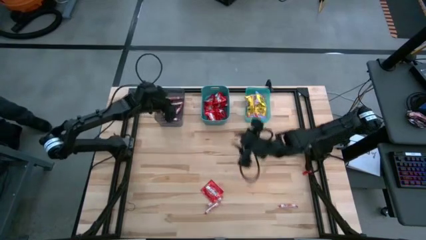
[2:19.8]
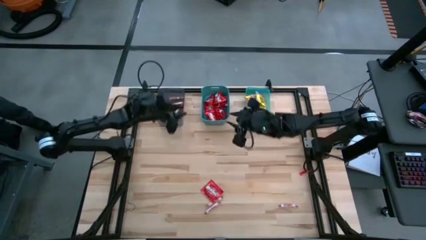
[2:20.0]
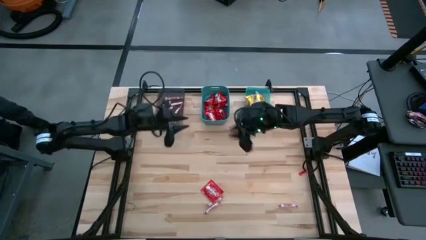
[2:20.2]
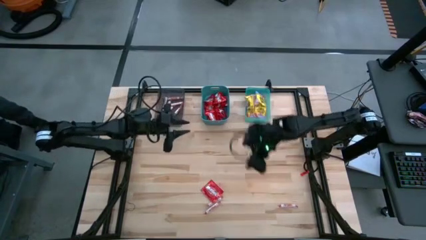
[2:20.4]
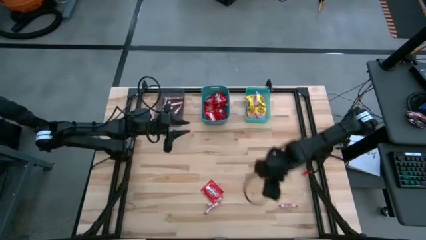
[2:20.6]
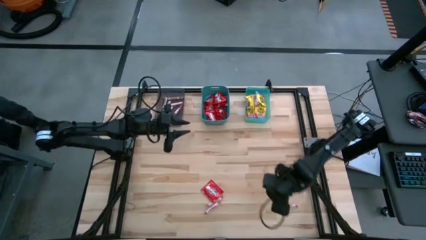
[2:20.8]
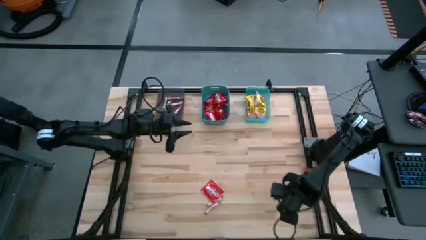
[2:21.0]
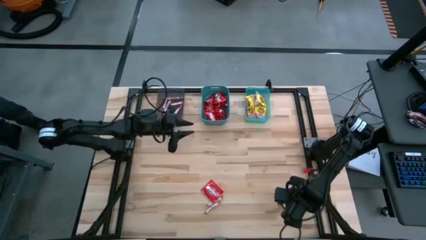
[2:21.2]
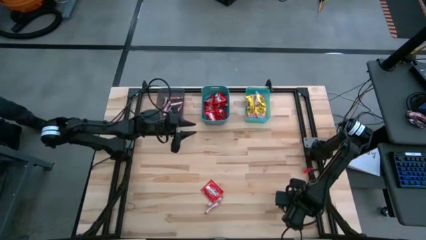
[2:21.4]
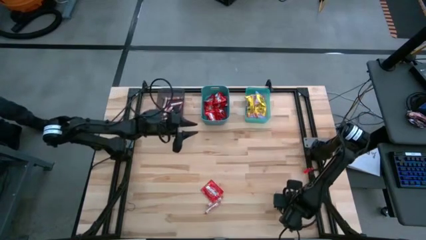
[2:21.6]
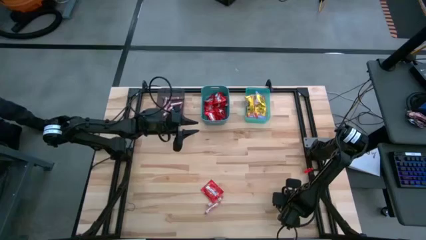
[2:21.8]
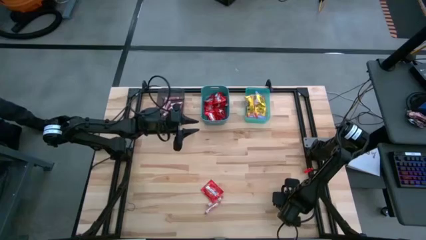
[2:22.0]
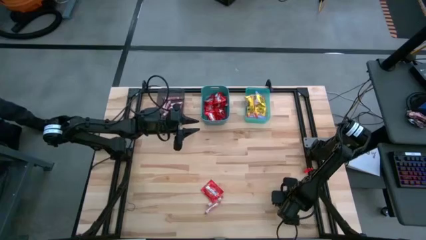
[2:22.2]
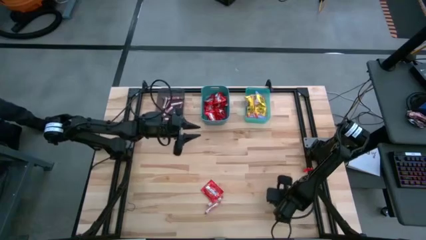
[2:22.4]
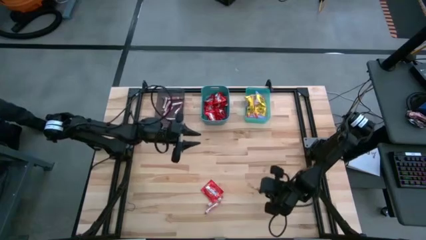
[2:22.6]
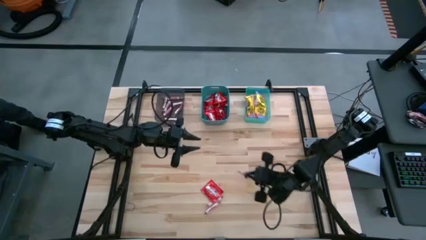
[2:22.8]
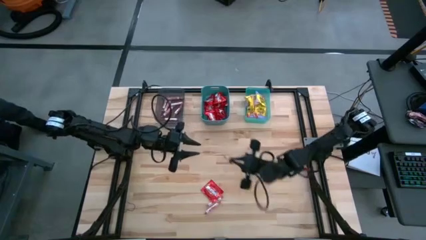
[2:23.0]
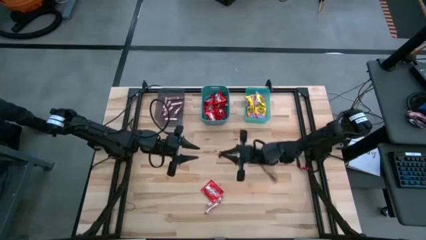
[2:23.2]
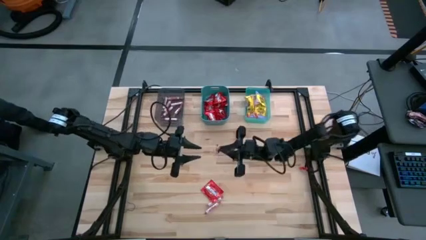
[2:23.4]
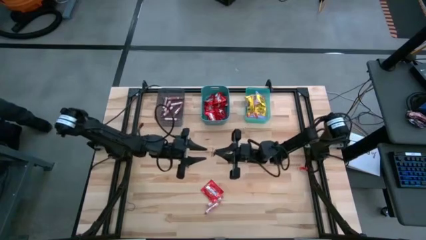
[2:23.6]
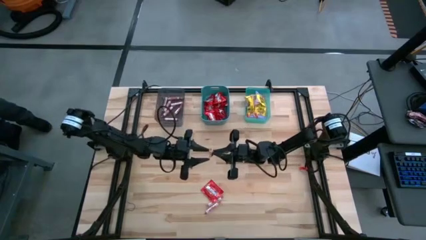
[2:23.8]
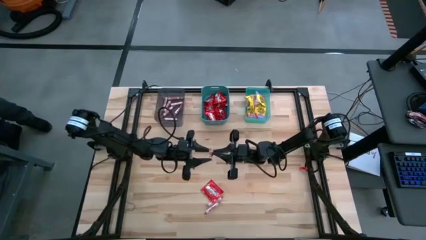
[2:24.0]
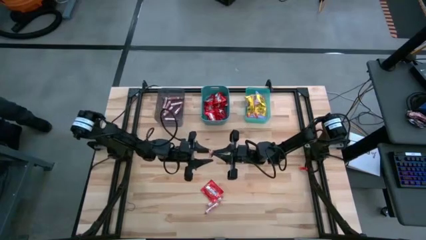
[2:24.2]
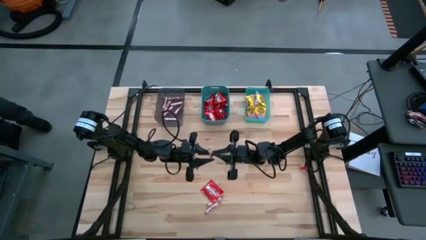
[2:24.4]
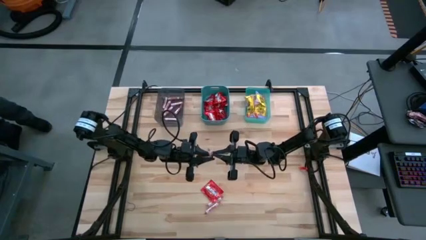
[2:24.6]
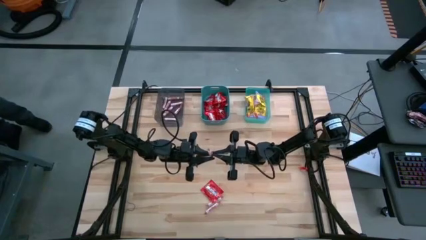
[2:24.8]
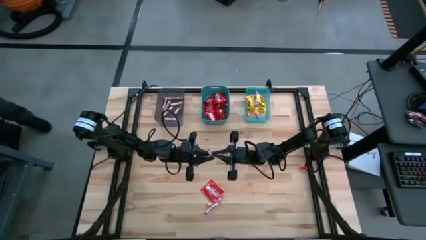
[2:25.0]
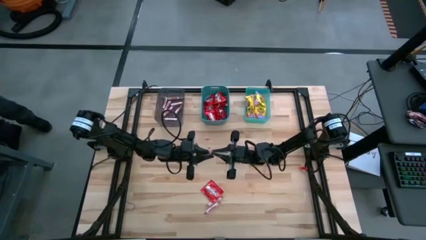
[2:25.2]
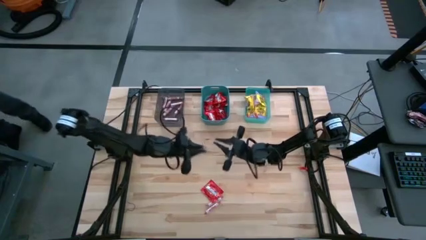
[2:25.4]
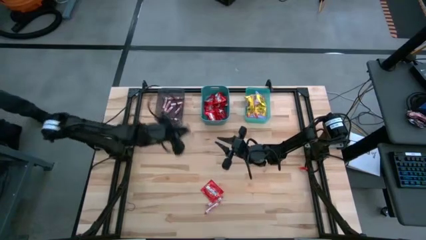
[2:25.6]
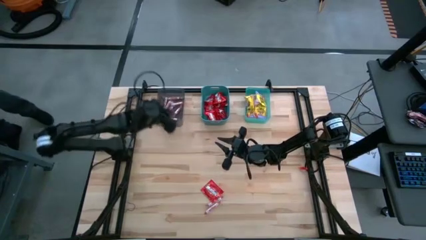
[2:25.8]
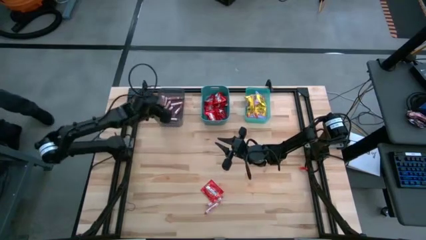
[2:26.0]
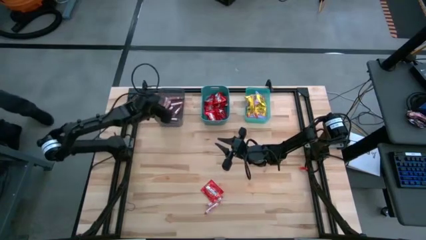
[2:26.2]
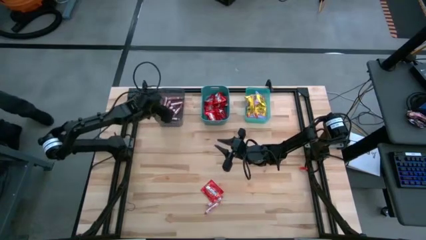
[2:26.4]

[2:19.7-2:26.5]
Task: Sort candy
Put the white candy on the black bin

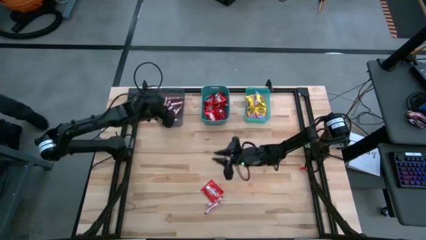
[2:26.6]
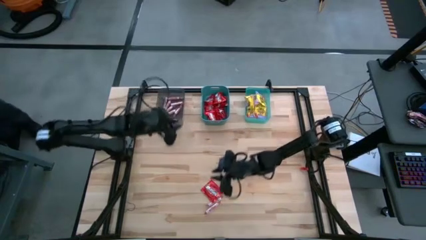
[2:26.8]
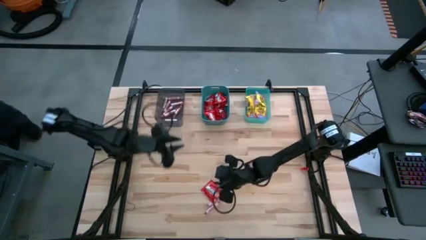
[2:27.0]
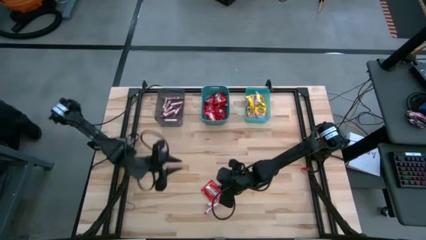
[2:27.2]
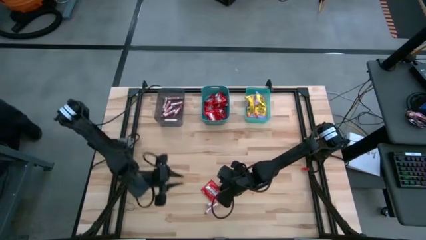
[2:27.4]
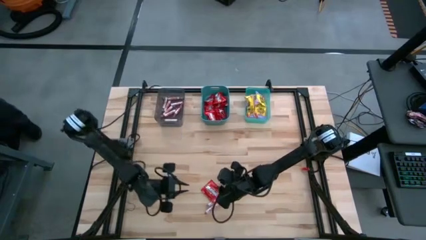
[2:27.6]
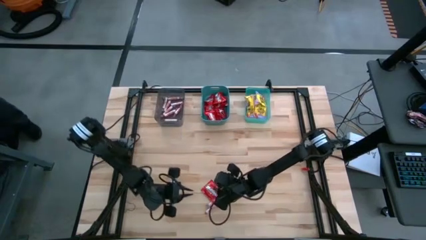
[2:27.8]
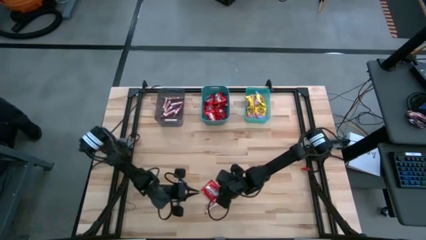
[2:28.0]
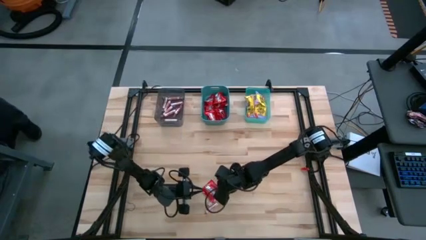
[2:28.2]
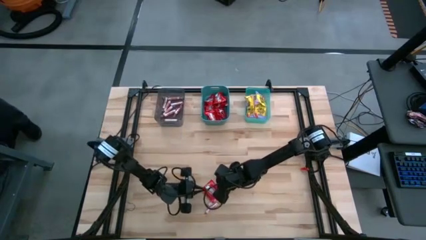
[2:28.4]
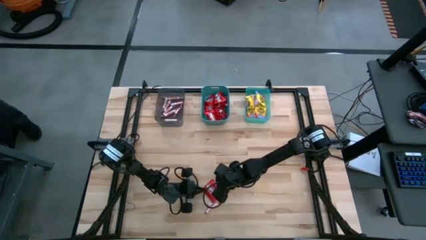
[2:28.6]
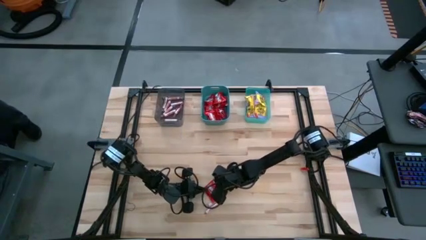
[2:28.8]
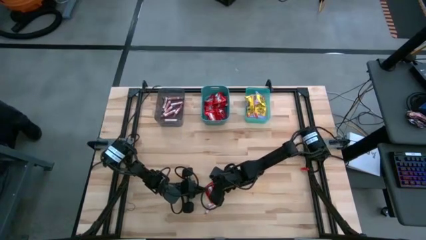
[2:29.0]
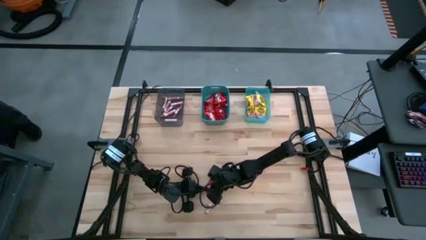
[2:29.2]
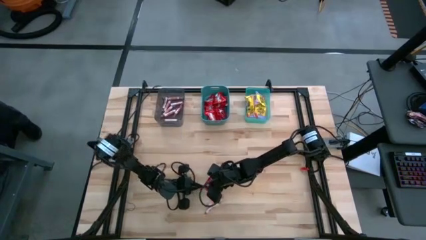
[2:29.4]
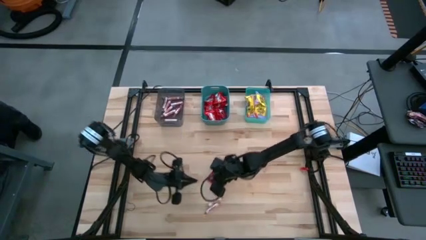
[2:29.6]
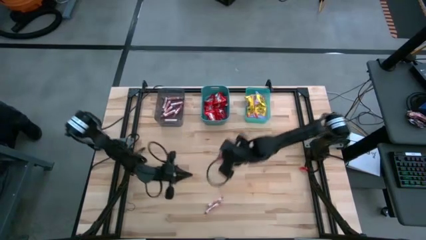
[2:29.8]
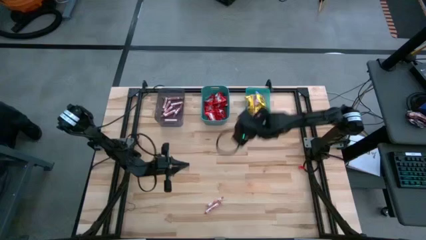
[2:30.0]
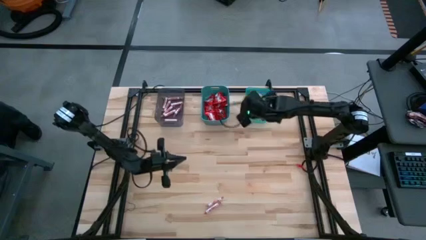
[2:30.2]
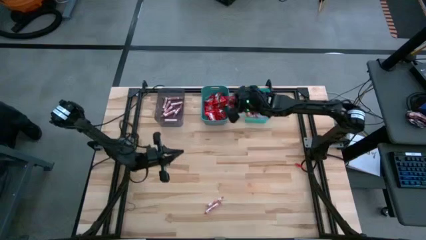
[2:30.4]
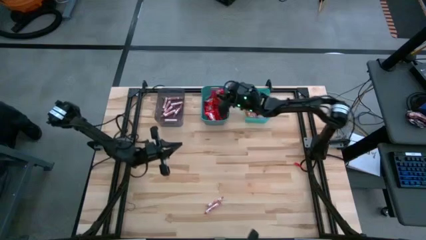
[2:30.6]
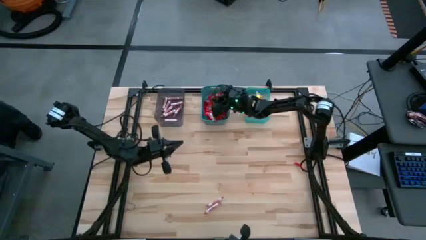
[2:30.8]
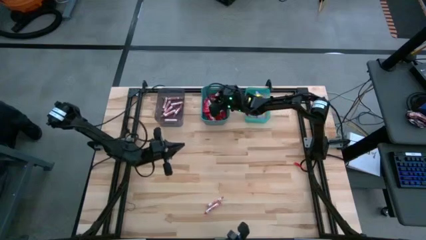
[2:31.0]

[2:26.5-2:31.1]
Put the red candy on the dark green bin

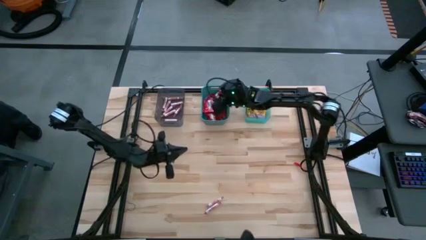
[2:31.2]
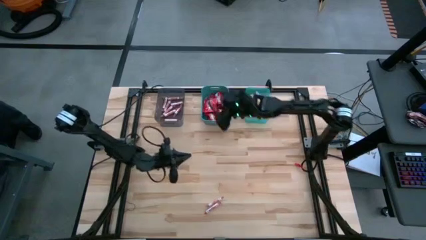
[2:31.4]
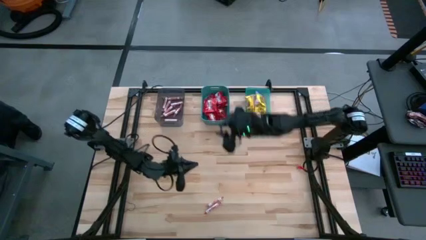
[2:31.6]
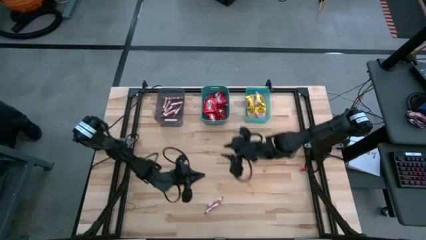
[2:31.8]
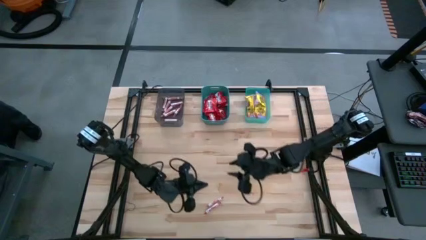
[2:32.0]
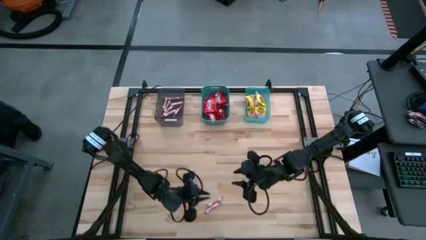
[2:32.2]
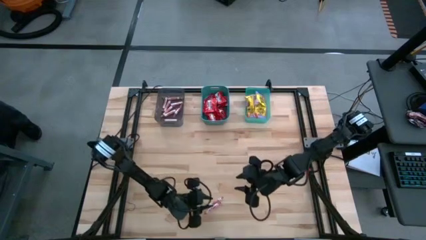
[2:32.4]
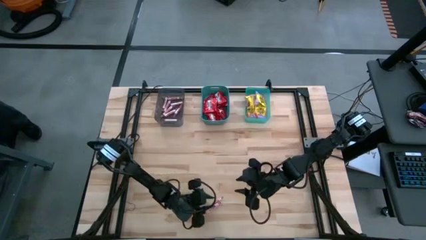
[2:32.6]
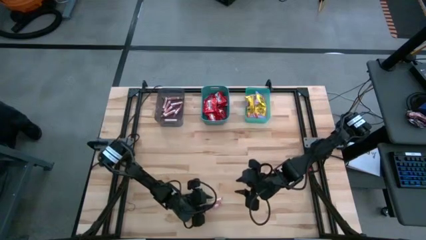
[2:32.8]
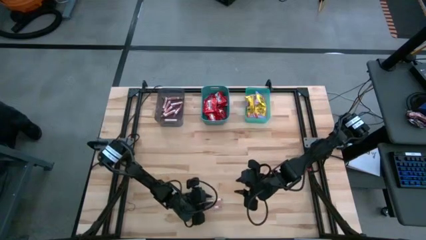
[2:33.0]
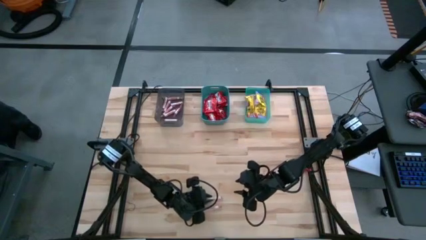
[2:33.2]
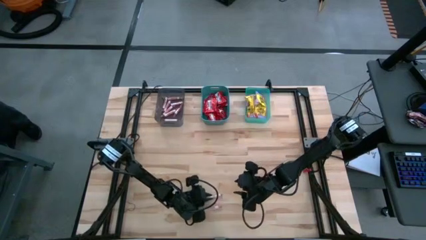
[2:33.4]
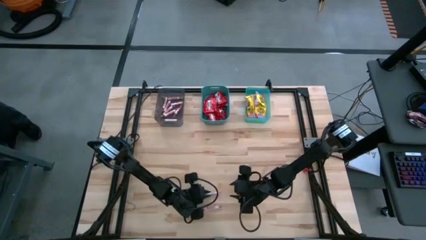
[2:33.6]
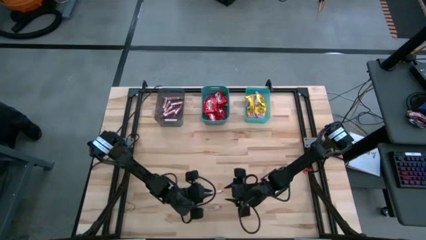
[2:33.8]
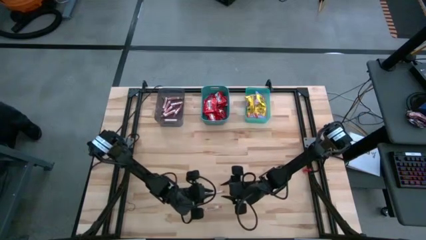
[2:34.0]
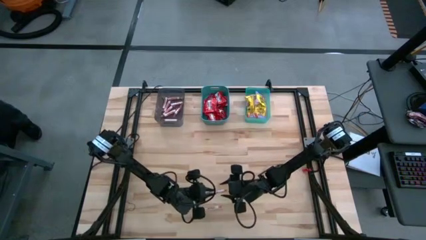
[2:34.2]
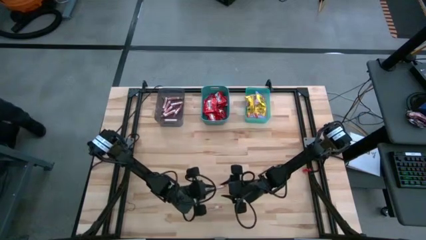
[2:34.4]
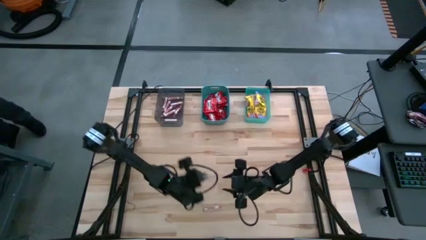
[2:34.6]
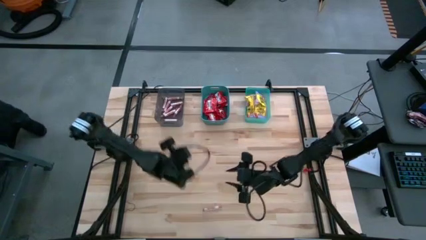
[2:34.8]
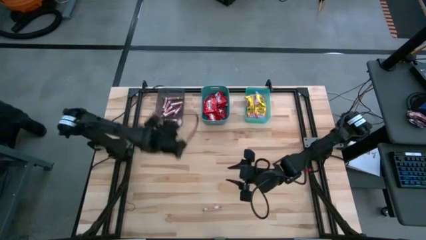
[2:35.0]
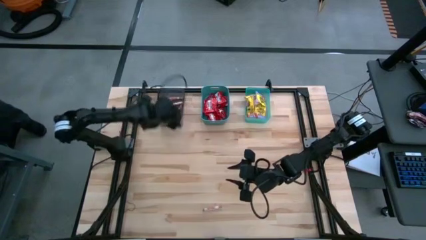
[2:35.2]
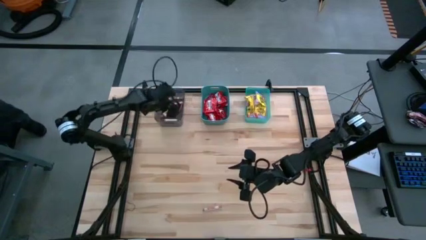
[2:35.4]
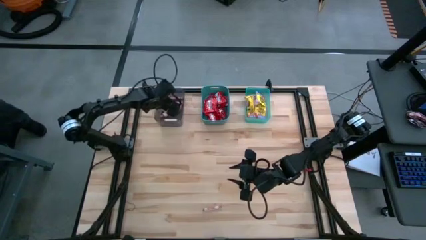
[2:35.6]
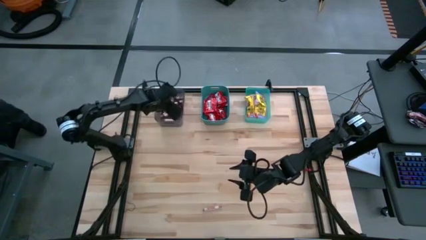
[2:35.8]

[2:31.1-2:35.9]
Put the white candy on the black bin

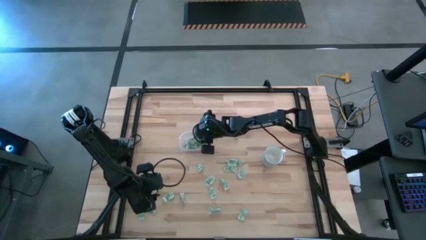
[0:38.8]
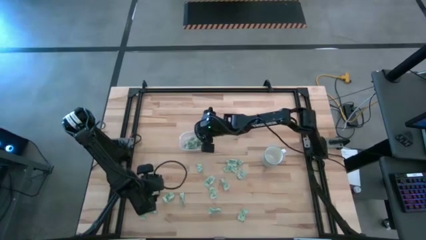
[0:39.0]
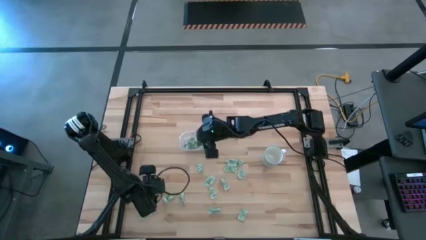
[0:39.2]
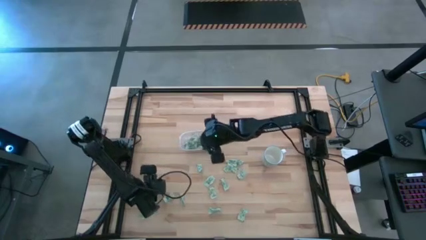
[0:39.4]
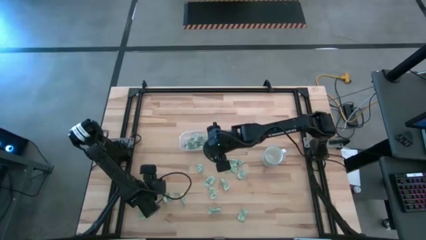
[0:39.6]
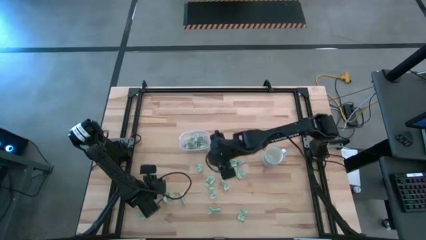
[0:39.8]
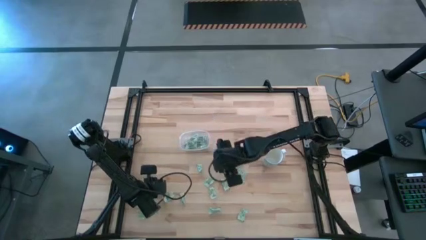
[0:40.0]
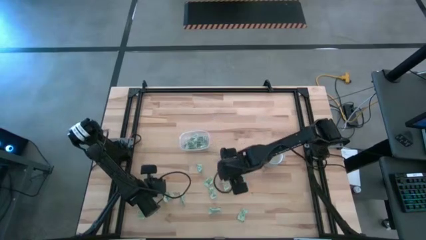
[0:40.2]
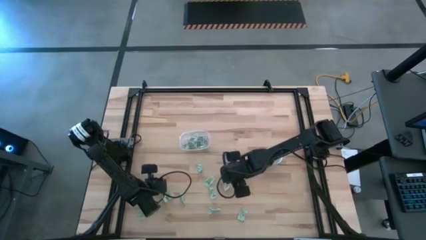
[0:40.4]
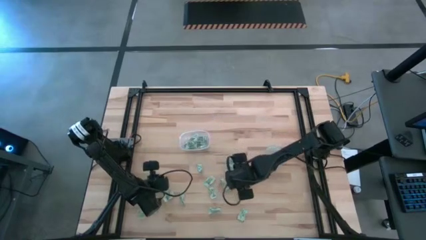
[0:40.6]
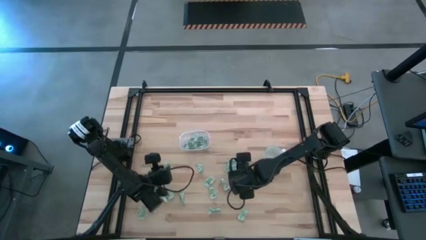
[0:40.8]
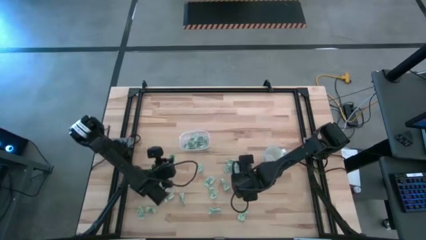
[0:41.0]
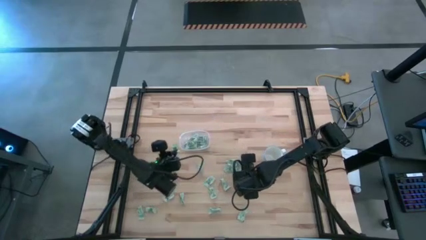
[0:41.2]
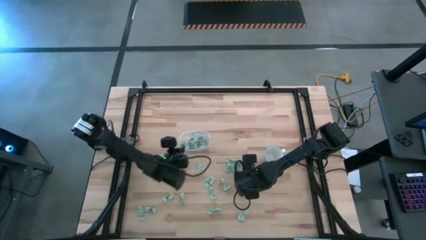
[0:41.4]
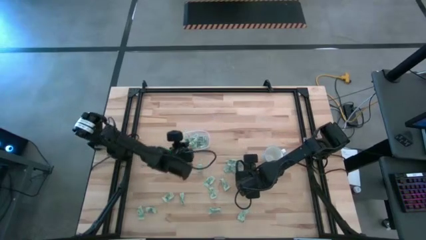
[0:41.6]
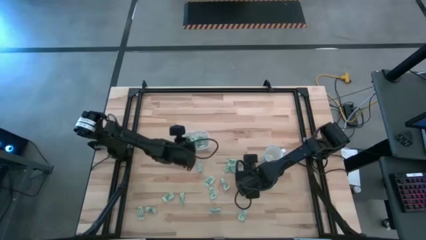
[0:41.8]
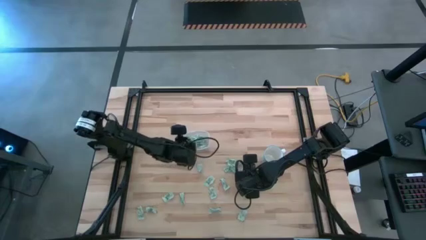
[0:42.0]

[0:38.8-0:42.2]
Task: Pick and place Stevia / Truvia into bins
Put the stevia packet into the transparent bin
